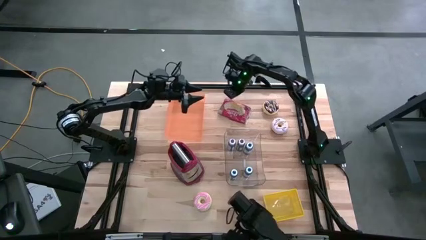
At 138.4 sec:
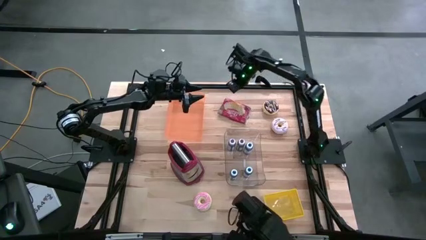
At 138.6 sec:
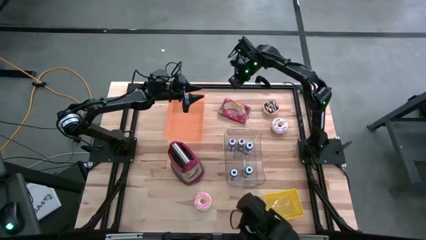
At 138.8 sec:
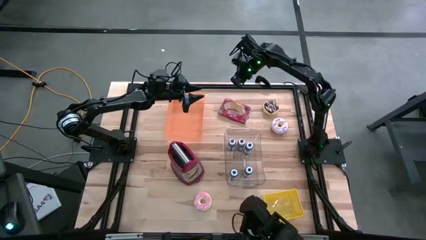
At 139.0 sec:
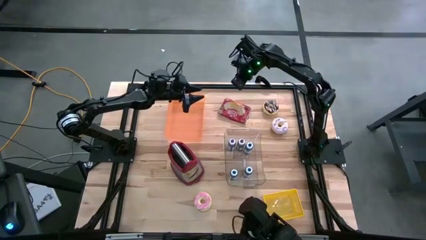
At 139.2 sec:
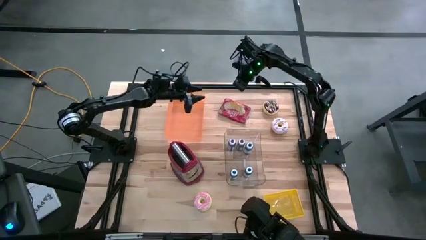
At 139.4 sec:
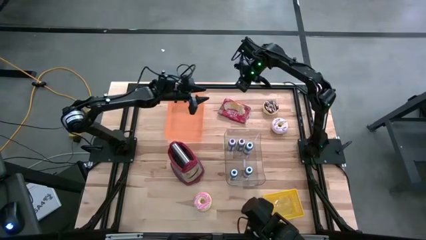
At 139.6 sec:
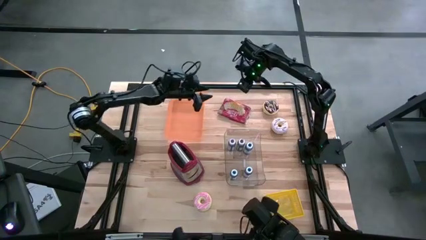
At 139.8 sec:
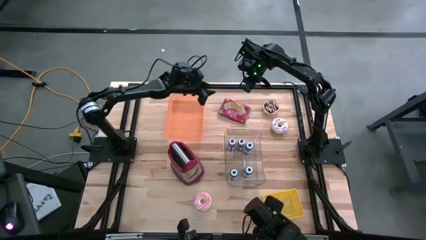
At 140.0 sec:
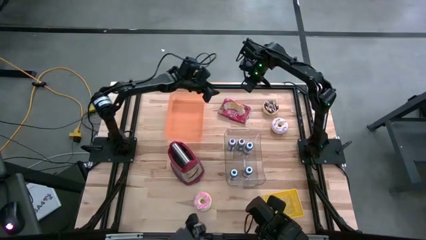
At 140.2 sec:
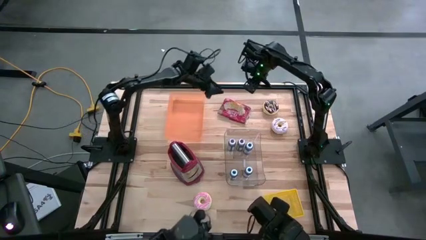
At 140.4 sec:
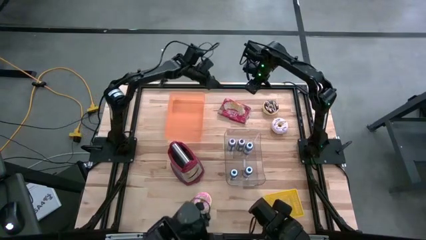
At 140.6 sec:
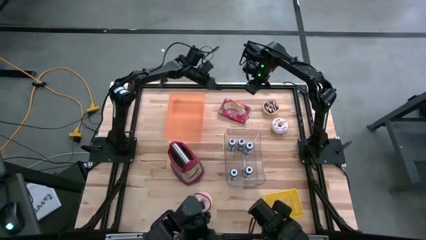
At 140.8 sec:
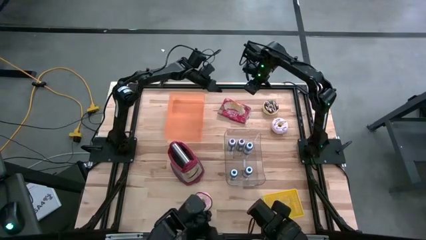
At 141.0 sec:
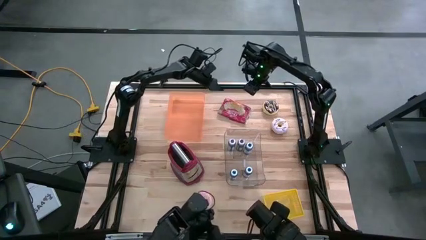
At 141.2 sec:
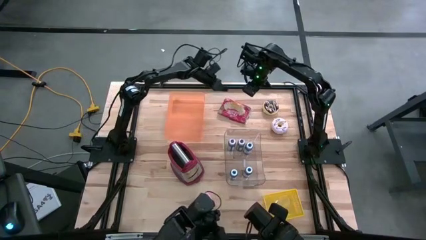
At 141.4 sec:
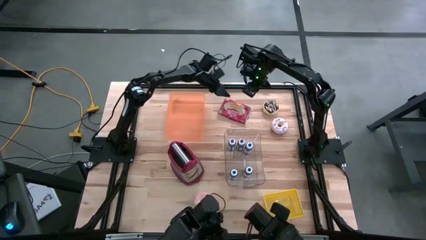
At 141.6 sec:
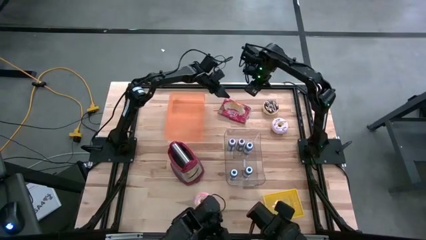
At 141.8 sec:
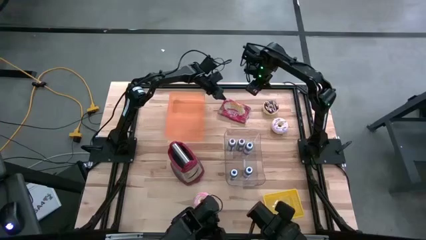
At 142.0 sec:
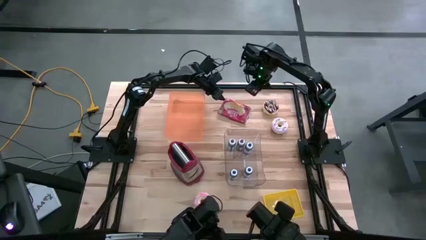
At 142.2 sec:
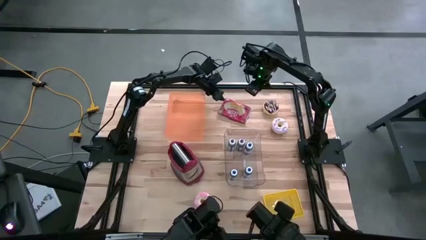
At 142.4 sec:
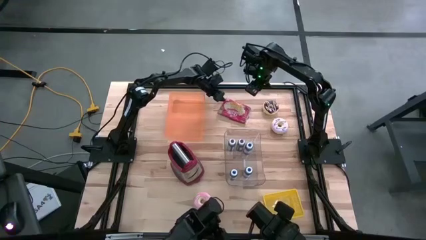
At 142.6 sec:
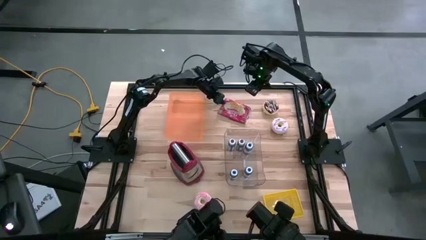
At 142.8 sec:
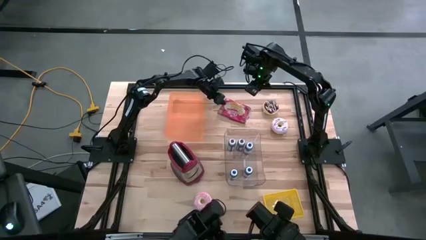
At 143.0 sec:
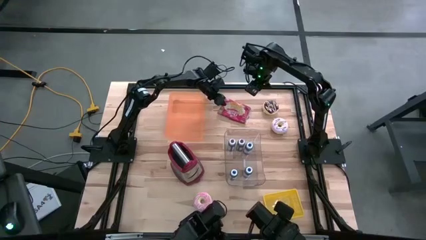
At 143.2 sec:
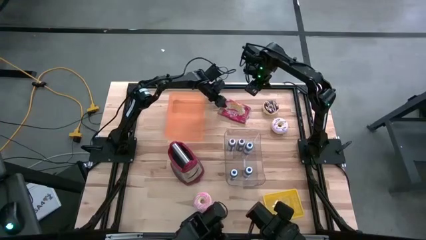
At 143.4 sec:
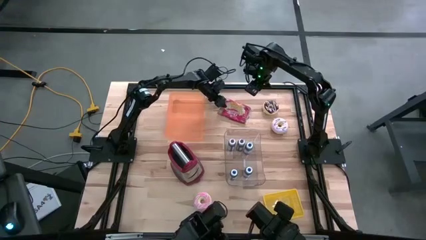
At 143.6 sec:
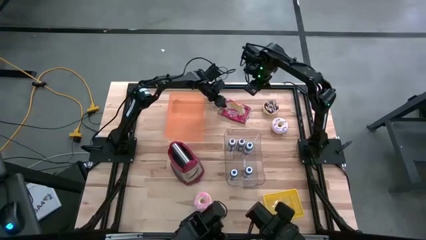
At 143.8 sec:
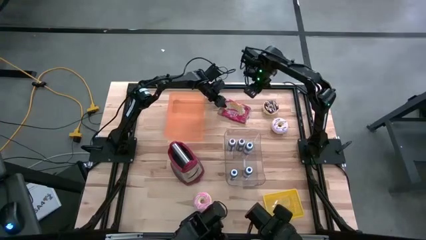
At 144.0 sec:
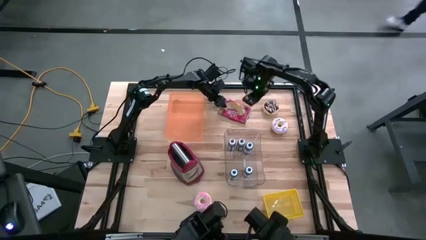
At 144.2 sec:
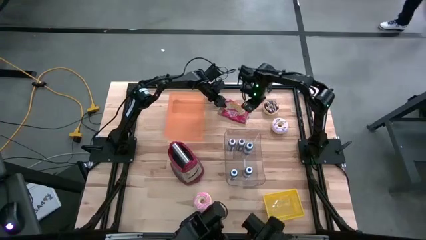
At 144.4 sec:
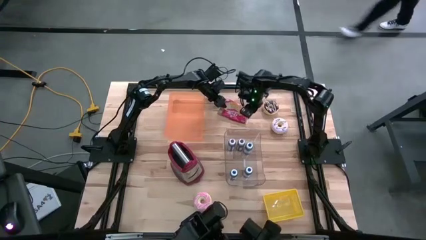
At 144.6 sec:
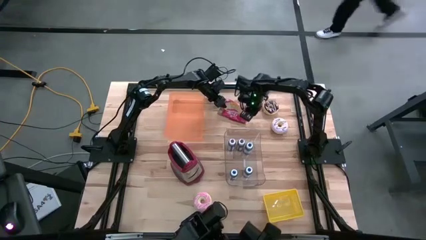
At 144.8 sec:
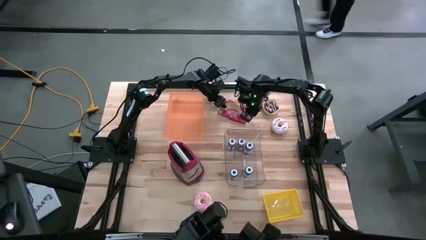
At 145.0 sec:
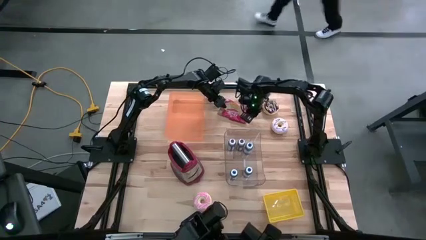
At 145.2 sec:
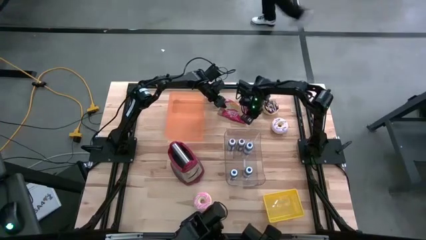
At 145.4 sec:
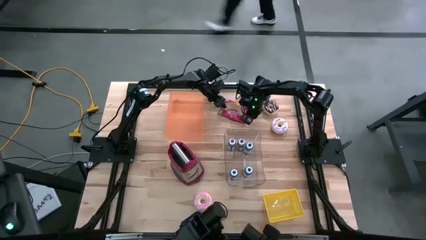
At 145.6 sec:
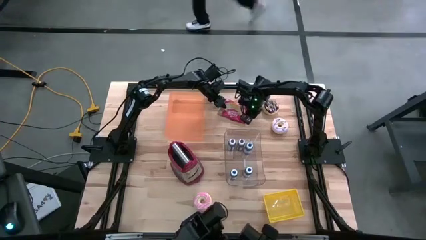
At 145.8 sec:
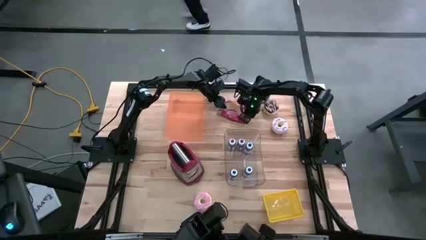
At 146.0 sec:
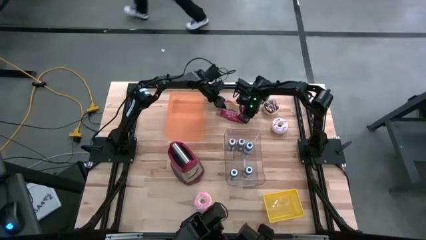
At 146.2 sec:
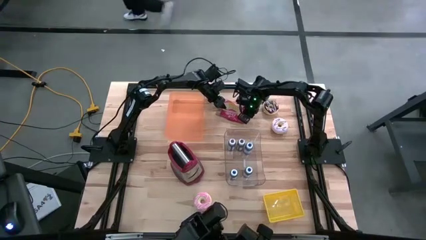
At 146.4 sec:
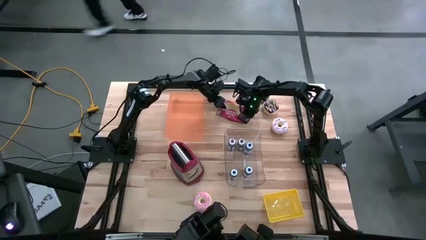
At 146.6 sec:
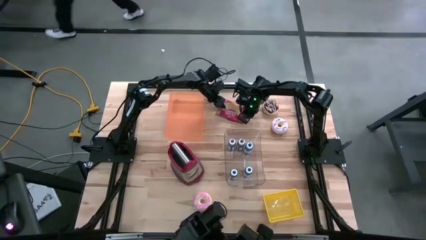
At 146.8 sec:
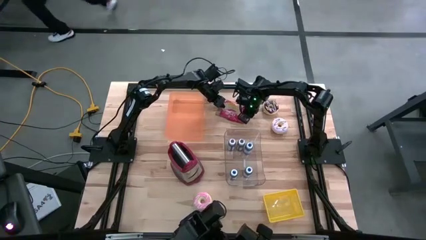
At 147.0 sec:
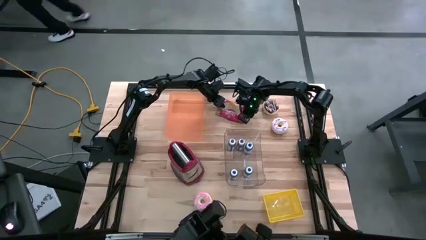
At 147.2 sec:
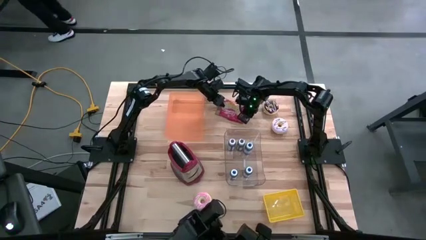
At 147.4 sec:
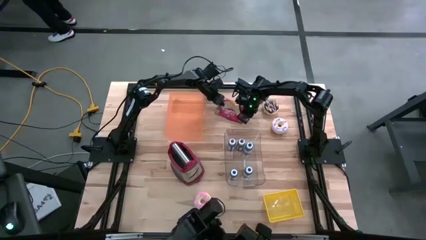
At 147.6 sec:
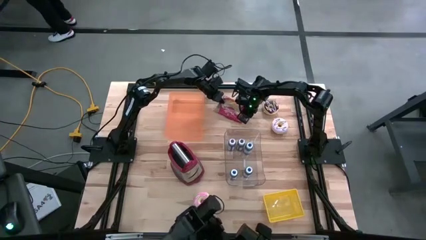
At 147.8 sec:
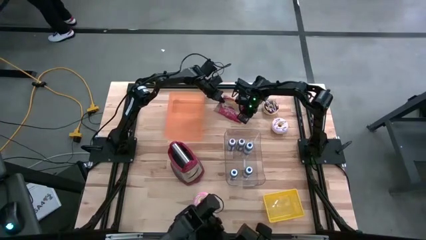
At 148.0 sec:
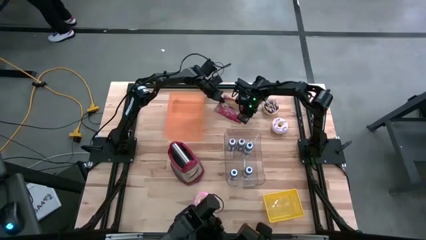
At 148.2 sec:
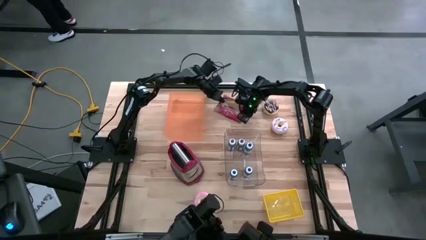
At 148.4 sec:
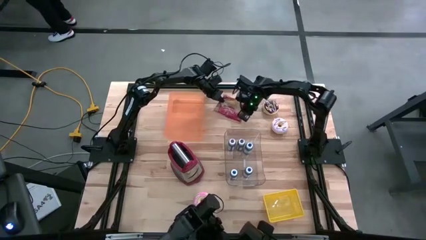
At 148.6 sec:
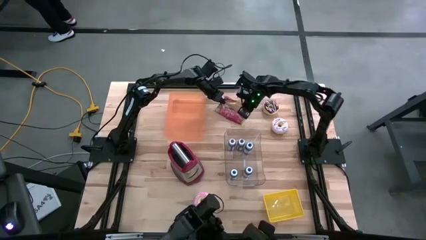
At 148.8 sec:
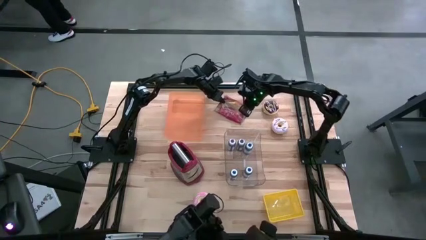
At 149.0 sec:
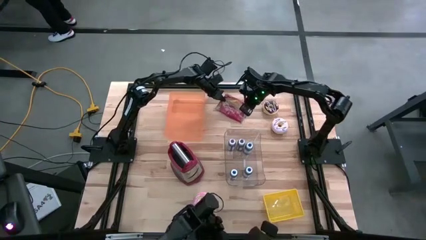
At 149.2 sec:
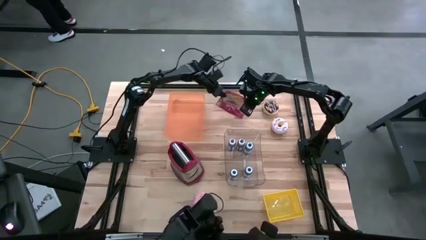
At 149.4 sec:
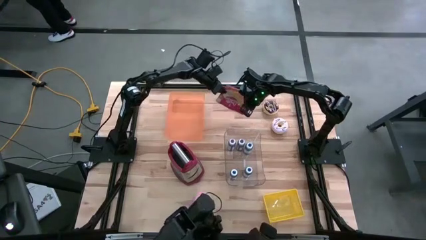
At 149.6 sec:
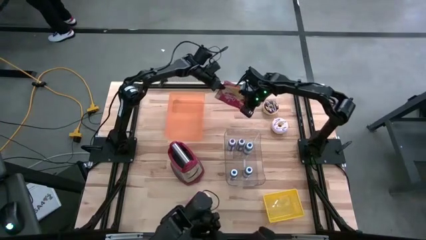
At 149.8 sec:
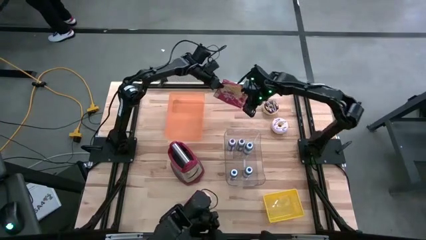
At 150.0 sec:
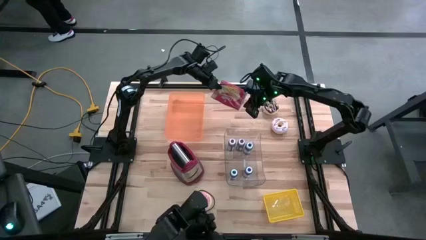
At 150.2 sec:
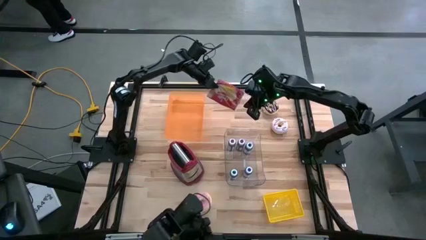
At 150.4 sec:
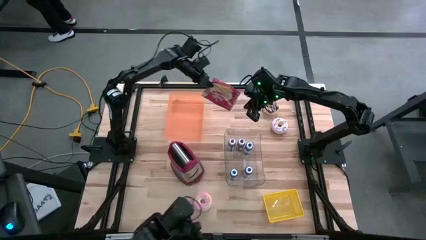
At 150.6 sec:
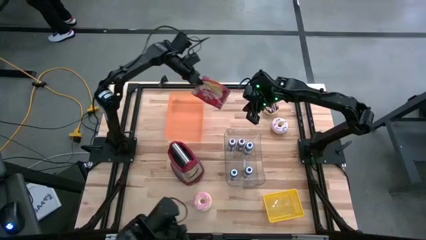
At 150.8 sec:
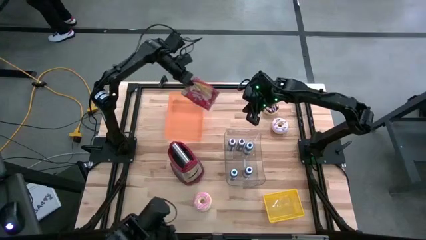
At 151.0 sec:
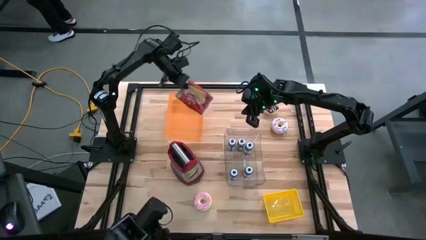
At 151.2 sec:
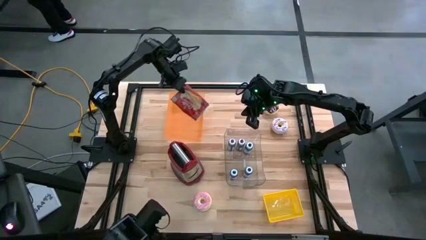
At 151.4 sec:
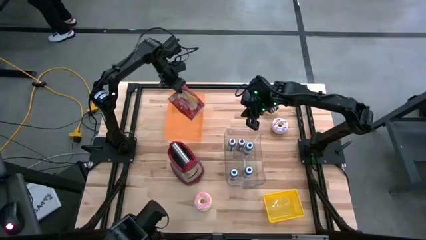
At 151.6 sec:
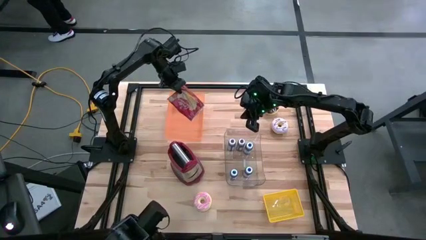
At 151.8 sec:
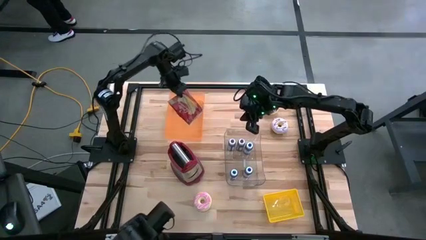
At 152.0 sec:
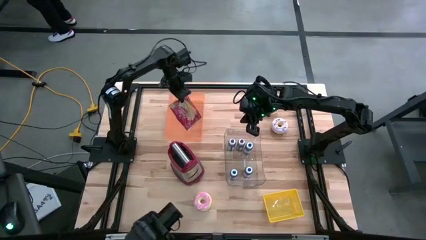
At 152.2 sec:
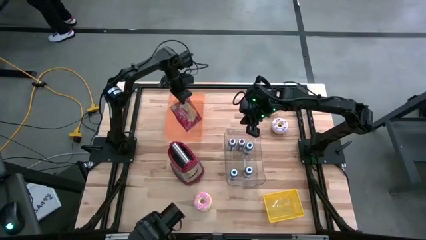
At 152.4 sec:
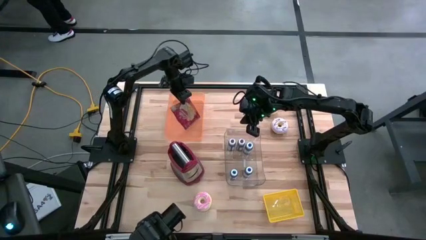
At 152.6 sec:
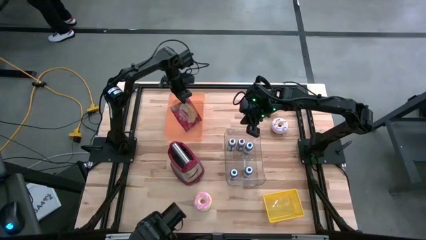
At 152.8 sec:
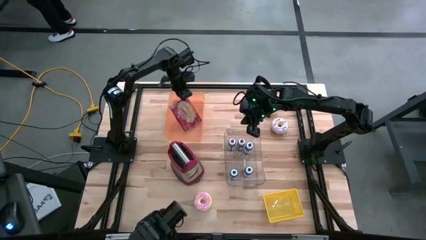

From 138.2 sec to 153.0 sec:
Task: Pick & Place Food Item
Put the red popcorn pack into the orange bin
